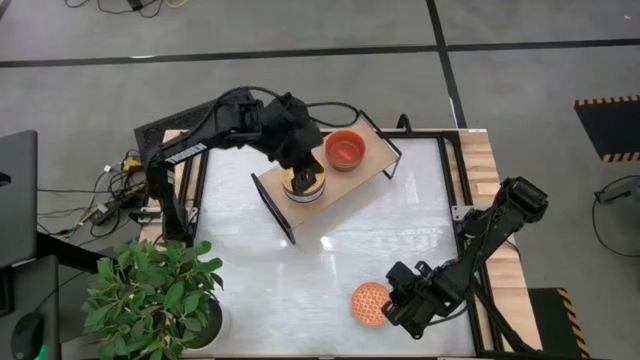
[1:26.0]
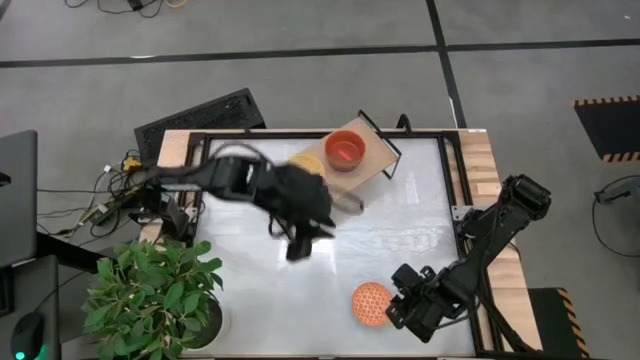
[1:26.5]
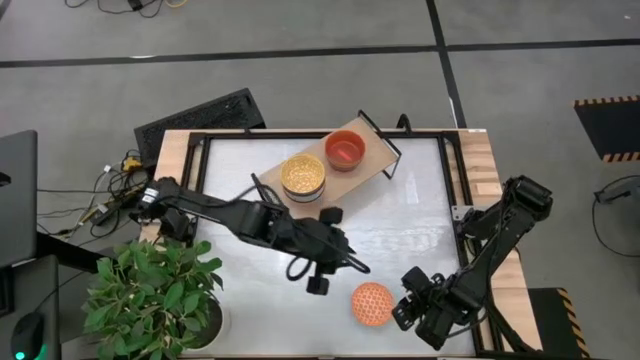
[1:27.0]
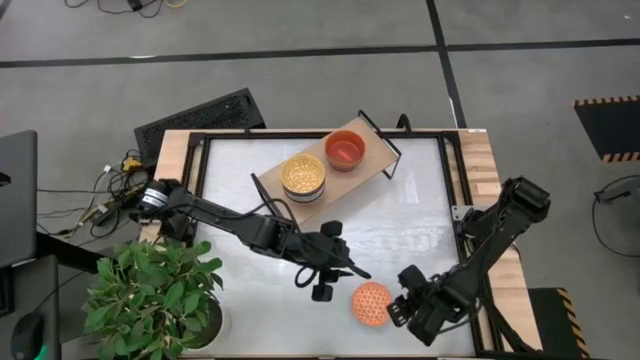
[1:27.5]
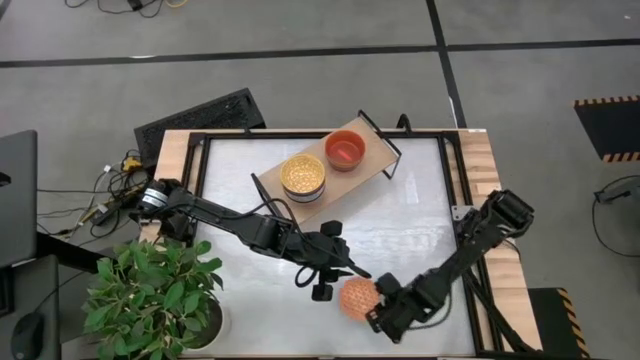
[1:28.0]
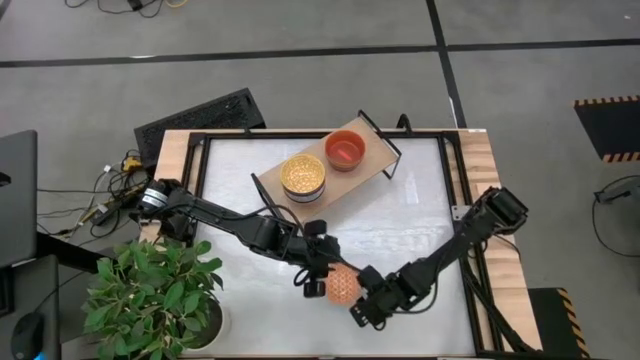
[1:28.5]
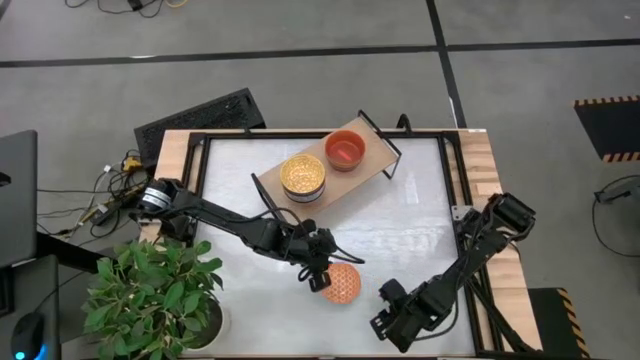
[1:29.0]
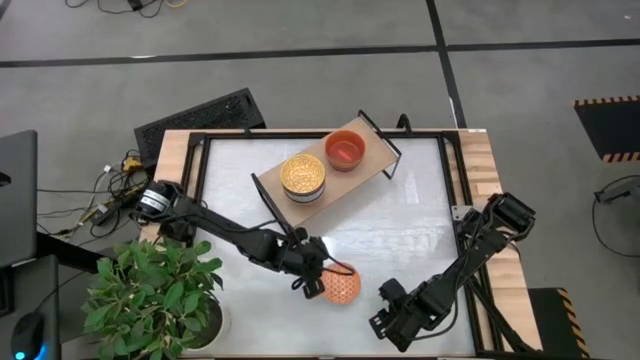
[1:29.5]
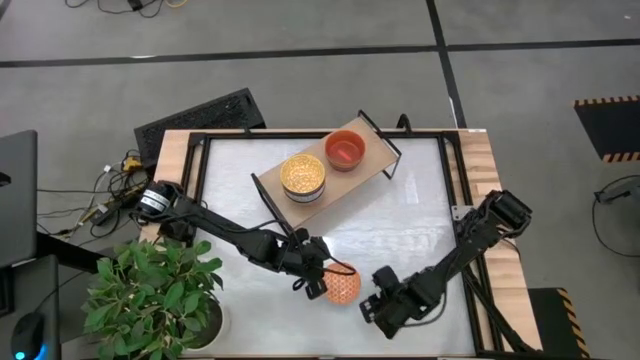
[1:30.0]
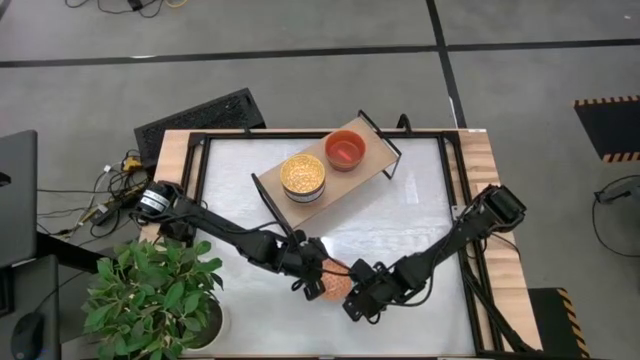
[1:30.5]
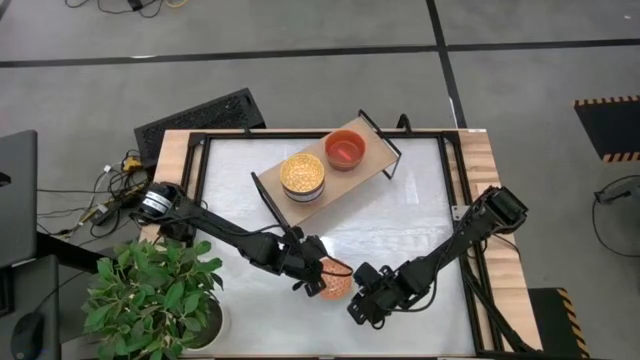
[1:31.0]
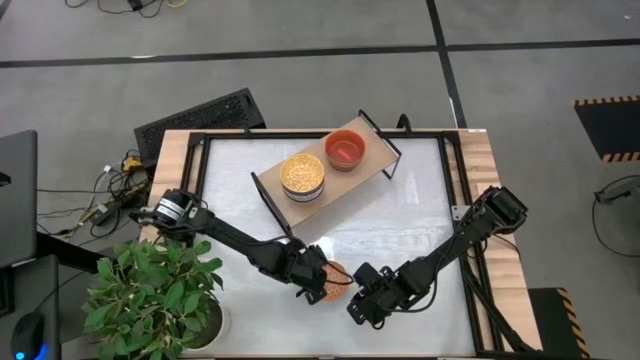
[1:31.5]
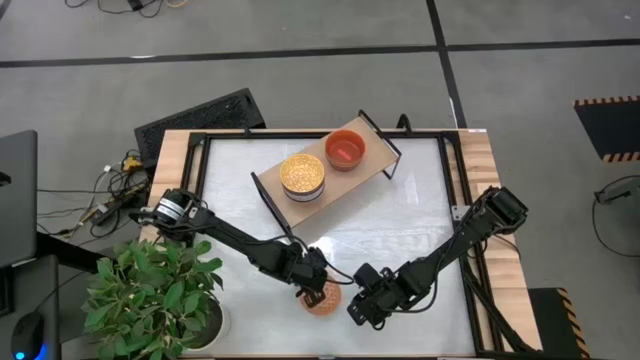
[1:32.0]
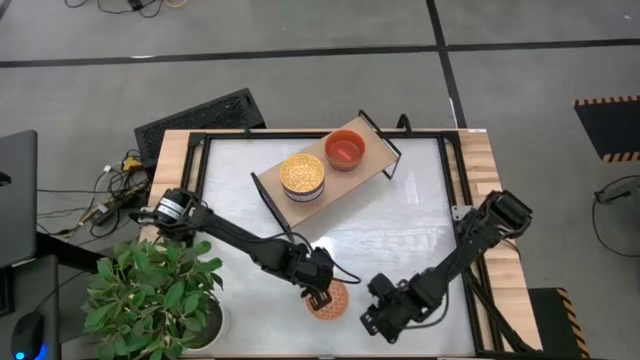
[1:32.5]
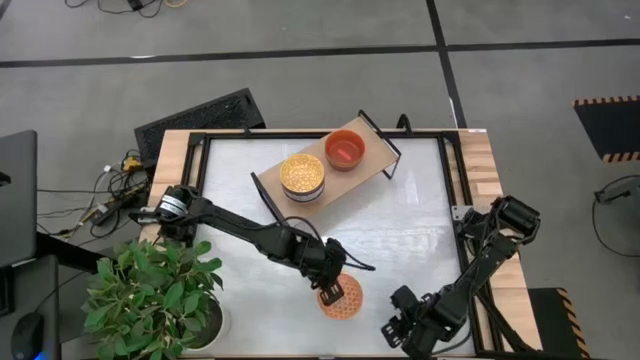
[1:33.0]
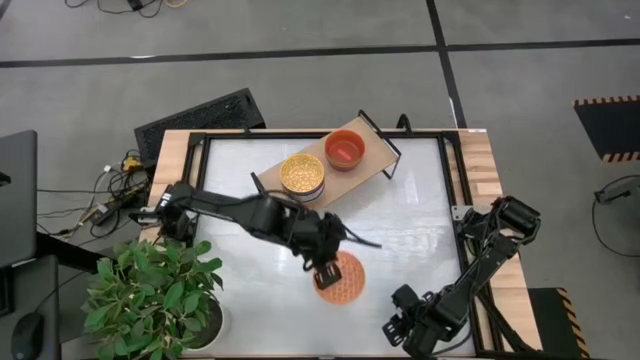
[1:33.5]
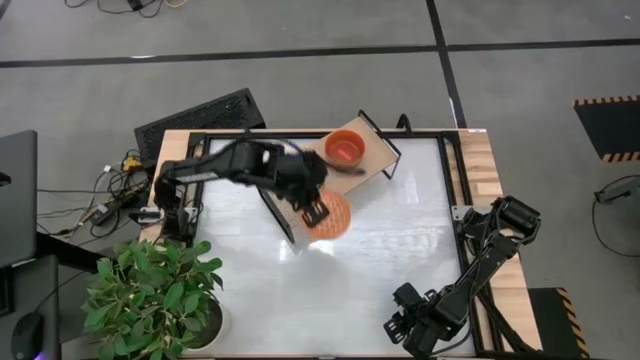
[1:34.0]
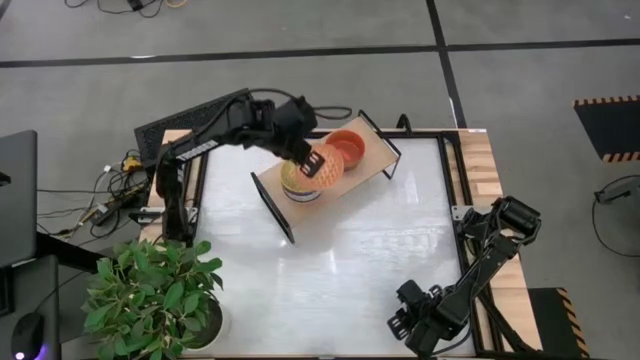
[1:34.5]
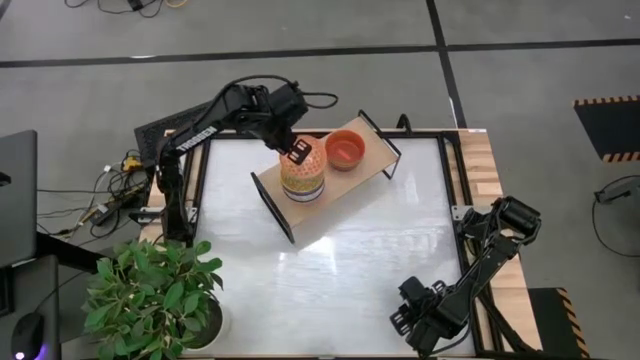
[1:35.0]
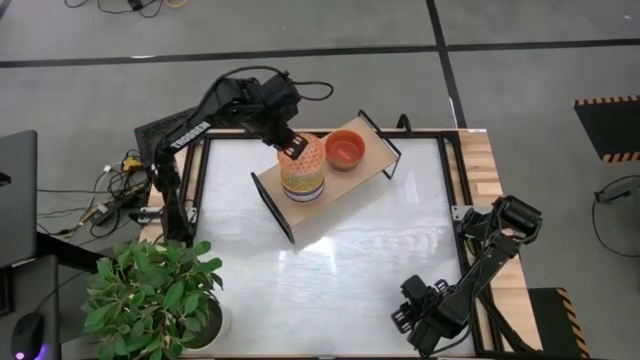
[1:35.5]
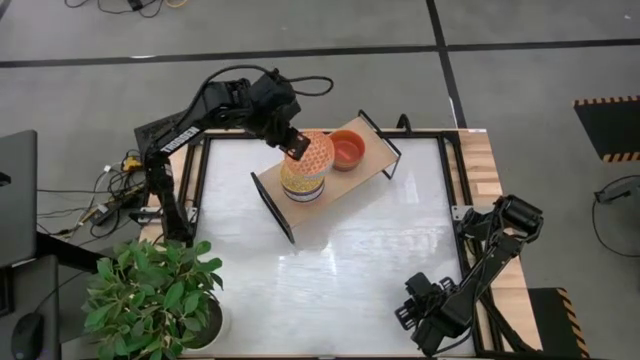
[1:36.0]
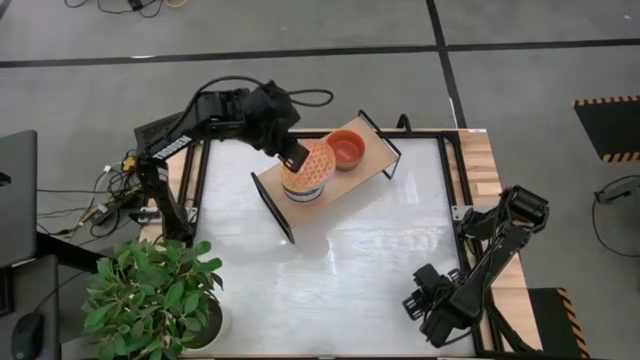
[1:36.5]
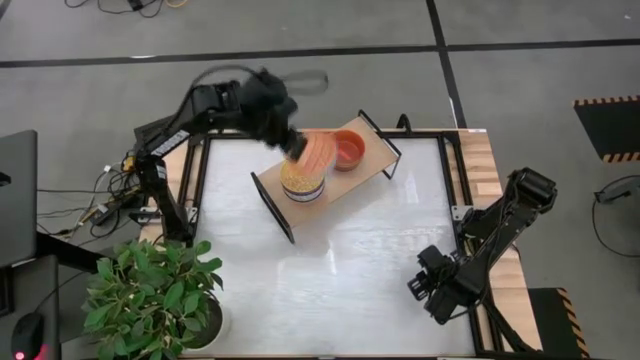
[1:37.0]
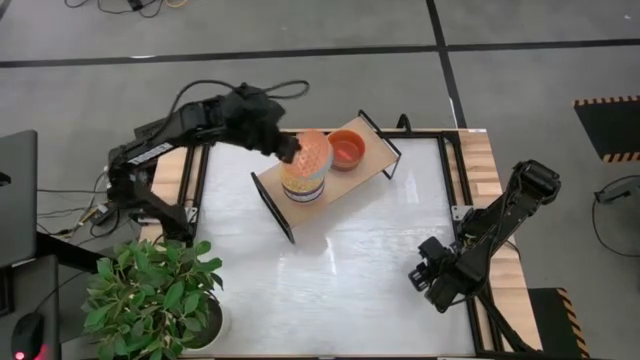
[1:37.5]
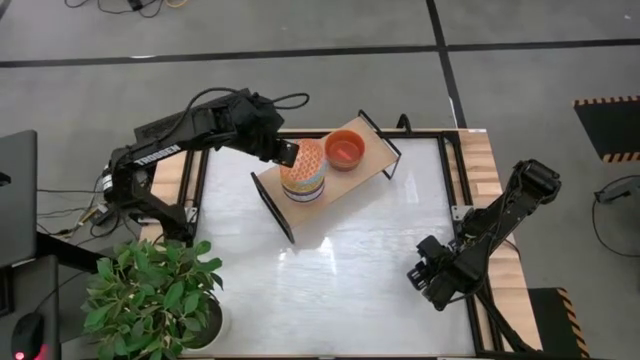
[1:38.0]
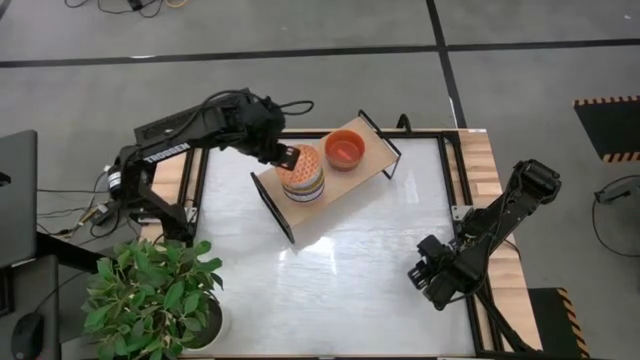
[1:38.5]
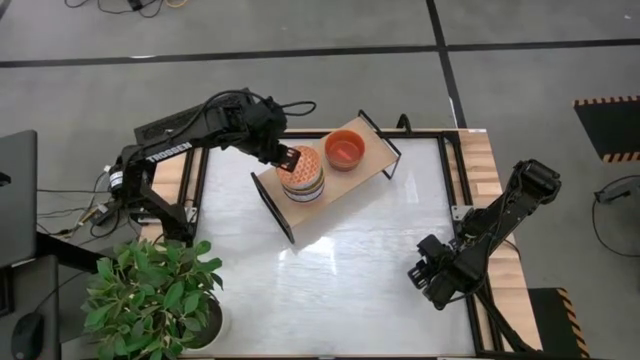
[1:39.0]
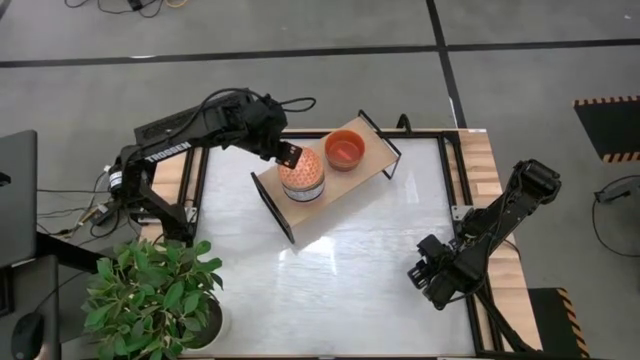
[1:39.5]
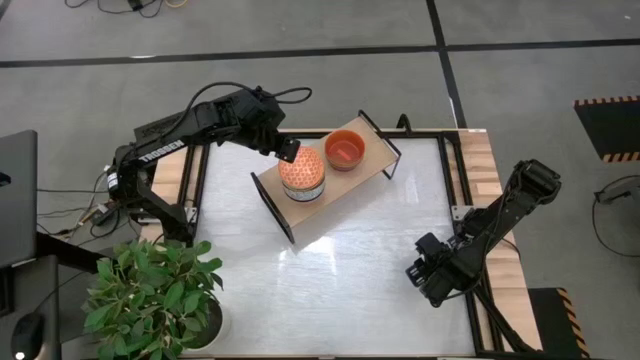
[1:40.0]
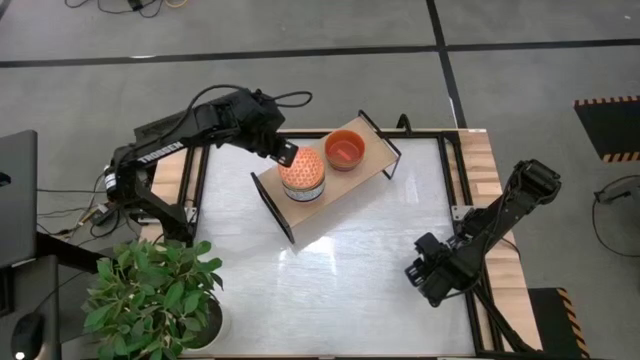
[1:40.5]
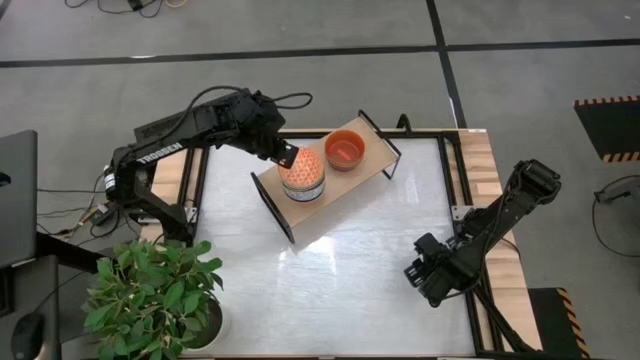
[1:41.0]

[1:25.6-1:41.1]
Task: Place and stack bowls onto a shelf
Stack the patterned orange bowl on top of the patterned yellow bowl on the shelf

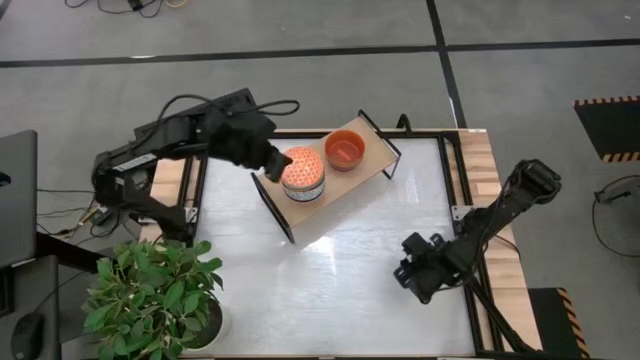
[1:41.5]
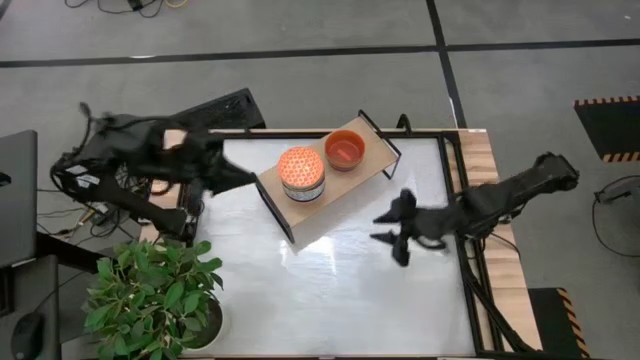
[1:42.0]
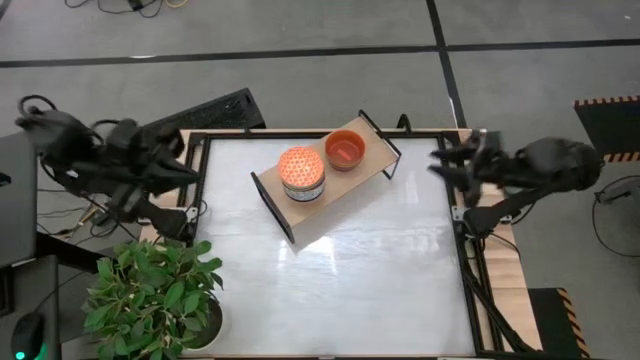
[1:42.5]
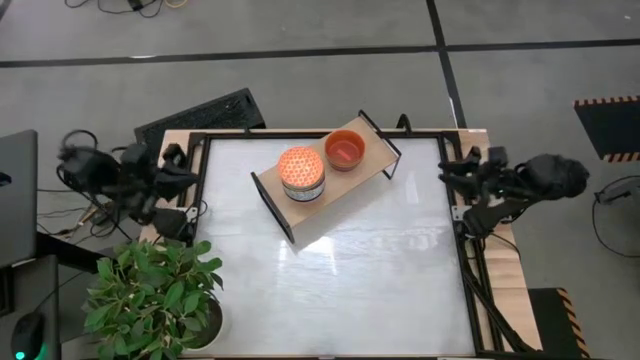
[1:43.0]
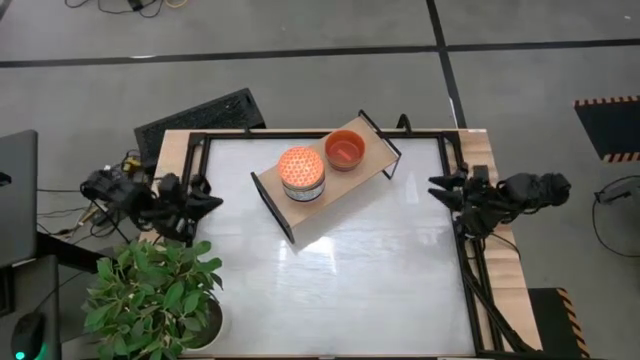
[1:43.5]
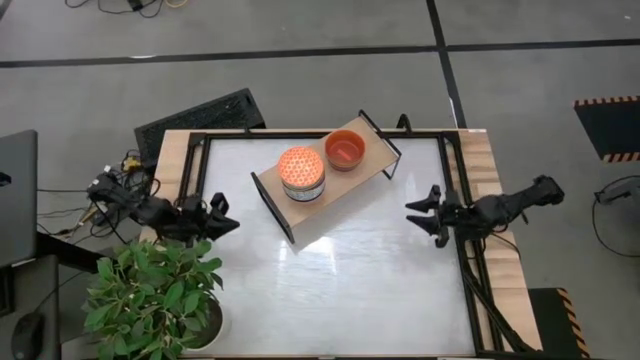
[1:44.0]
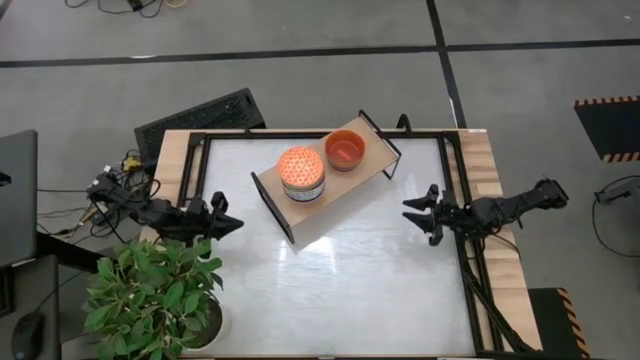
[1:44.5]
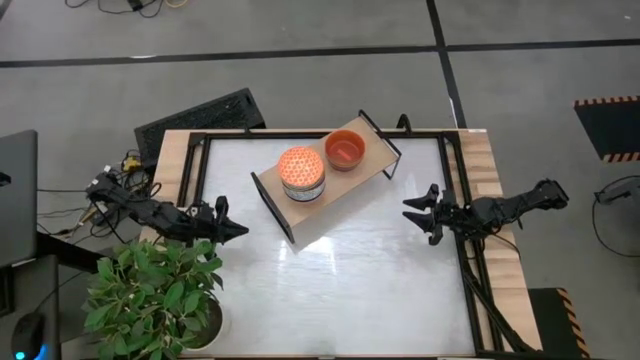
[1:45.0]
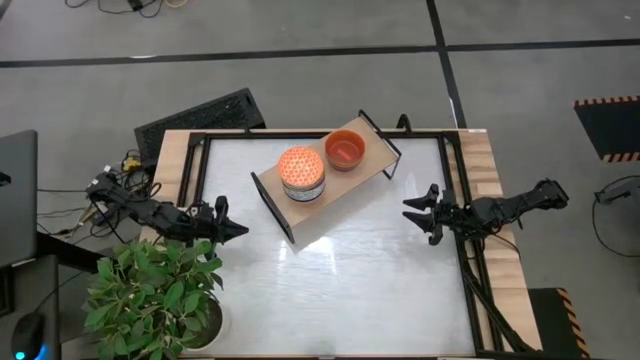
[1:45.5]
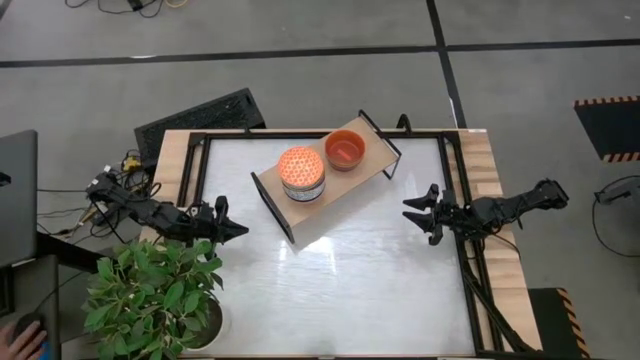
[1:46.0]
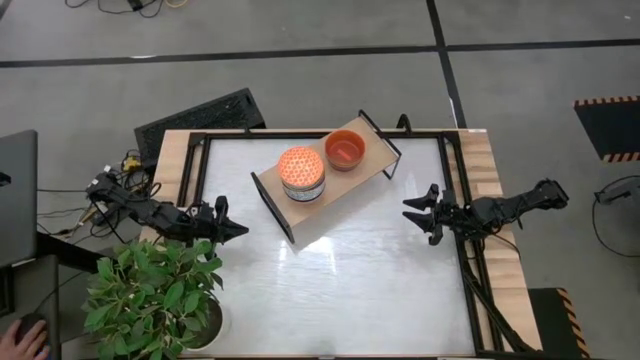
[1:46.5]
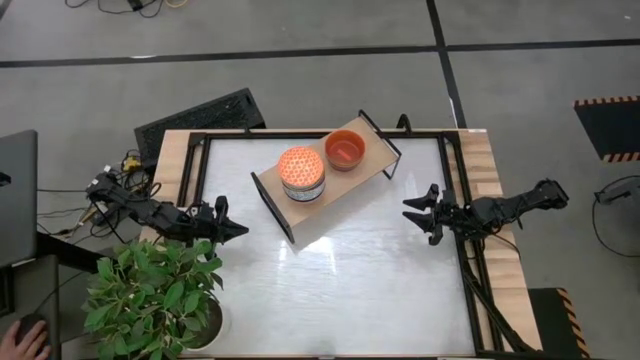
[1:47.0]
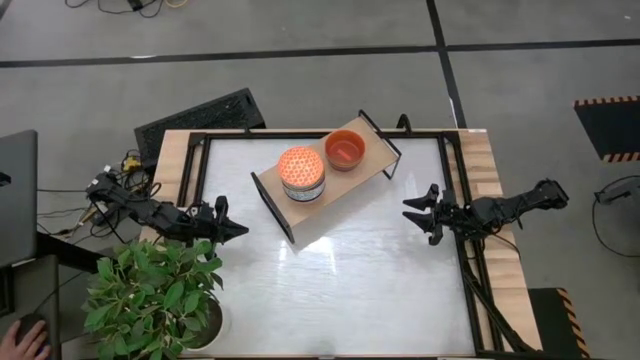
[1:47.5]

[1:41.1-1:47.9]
Return to Home Position
